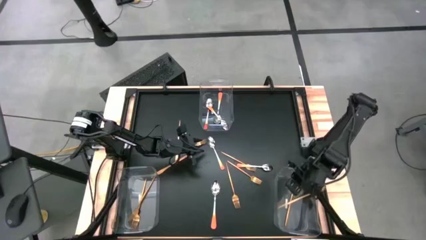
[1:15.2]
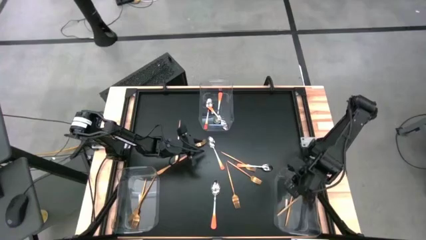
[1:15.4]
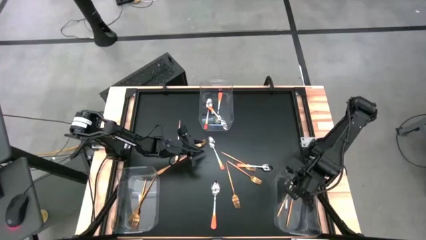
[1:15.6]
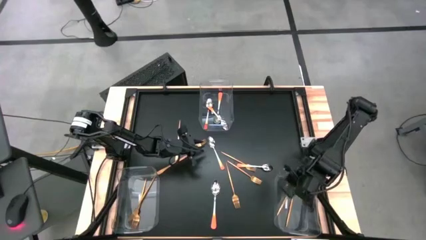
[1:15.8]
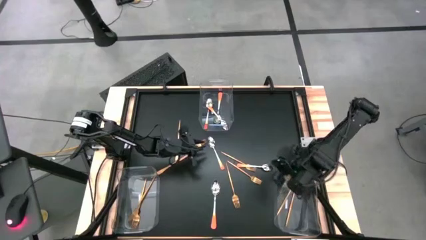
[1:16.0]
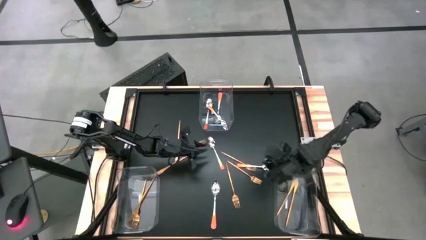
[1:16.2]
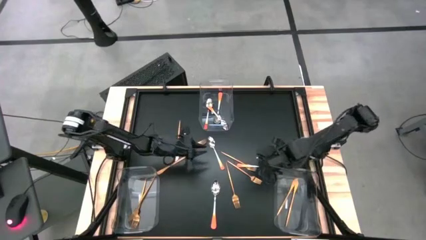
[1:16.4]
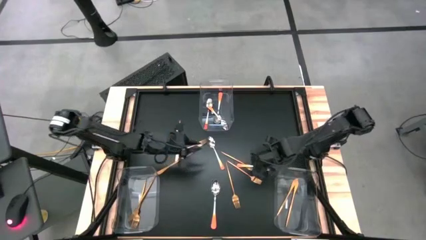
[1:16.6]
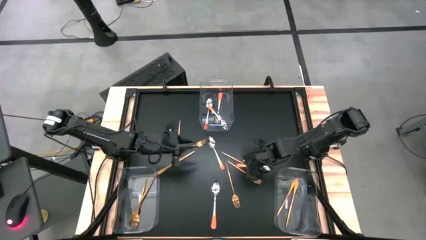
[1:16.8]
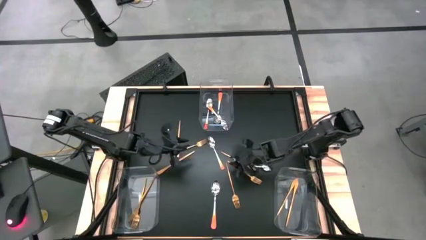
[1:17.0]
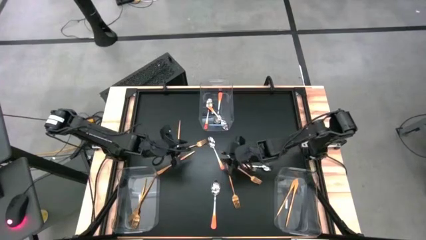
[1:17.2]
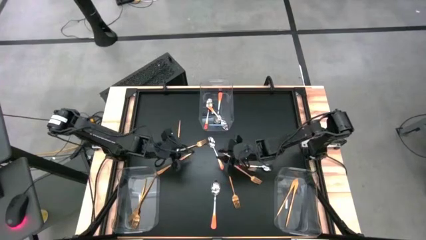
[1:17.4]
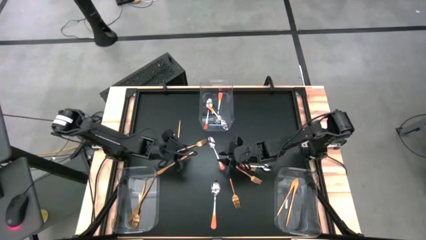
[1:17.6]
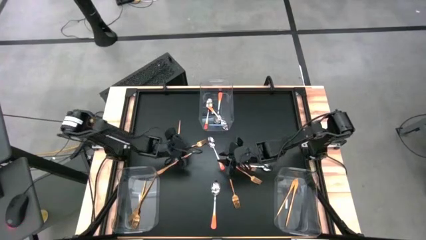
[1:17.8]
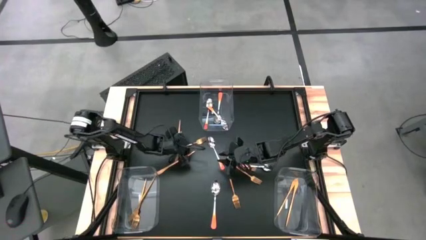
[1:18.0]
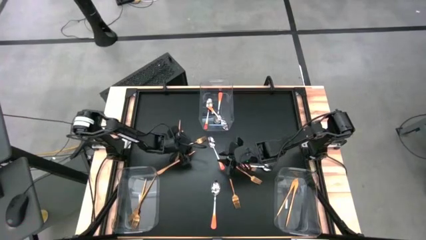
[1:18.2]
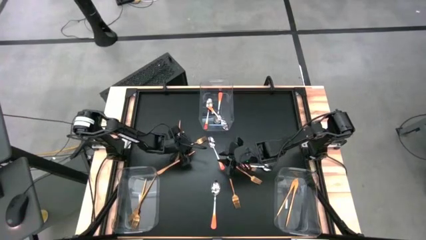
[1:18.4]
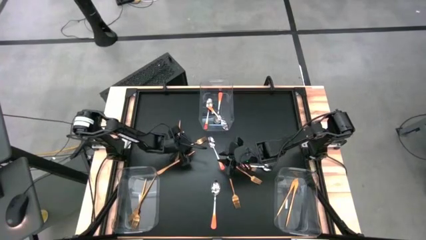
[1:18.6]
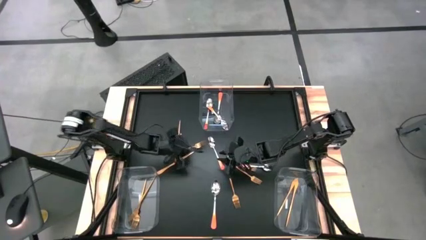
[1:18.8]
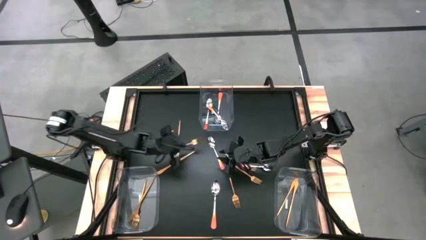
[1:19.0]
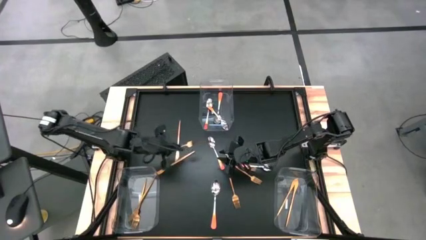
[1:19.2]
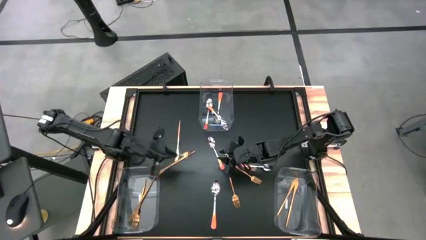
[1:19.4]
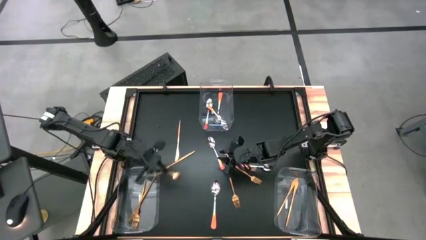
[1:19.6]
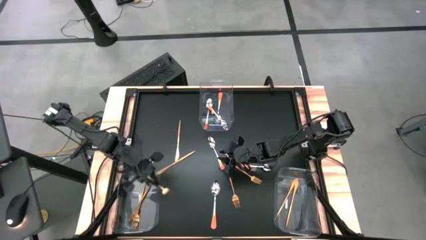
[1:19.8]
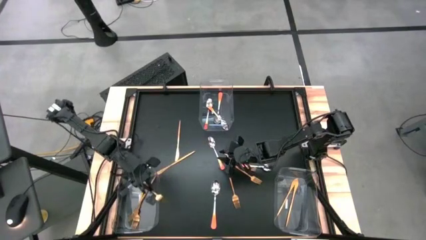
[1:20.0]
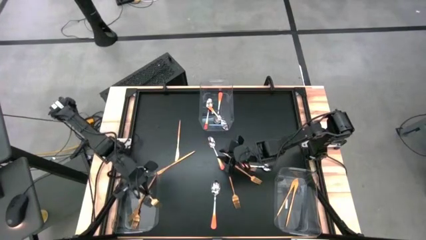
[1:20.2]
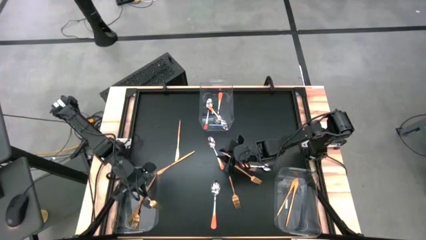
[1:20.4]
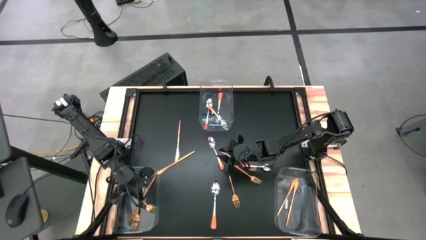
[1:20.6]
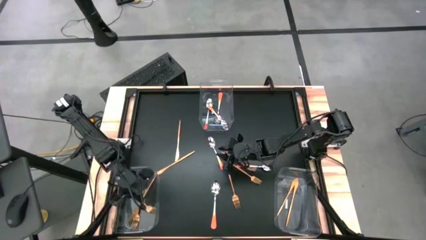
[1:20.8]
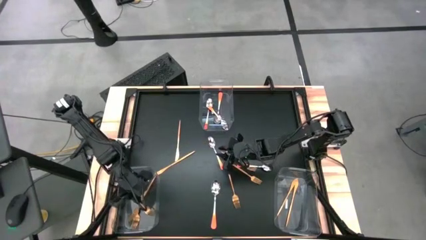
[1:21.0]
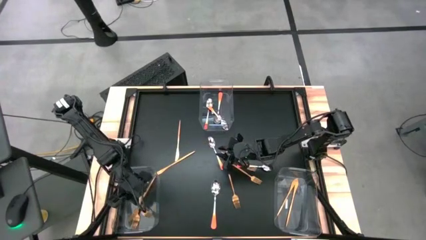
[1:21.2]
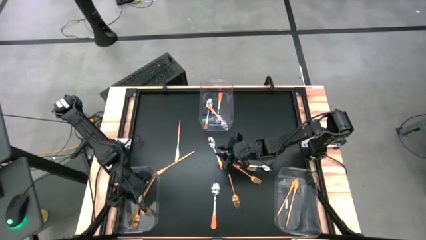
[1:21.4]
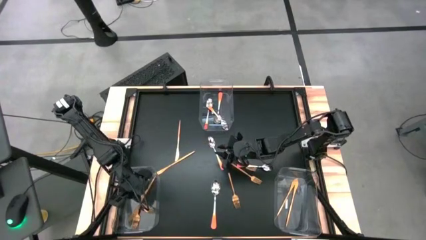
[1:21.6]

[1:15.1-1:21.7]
Task: Sort silverware by color (type)
Put the gold fork into the bottom left transparent bin

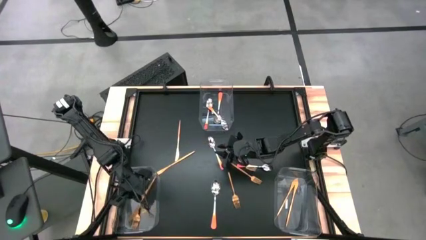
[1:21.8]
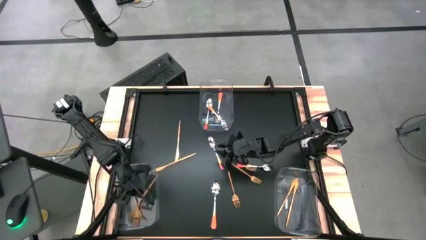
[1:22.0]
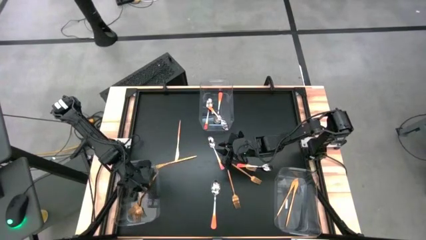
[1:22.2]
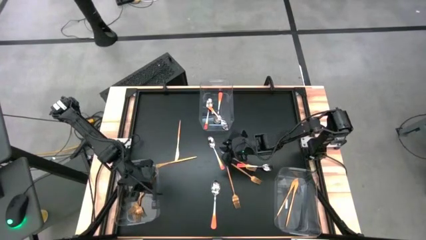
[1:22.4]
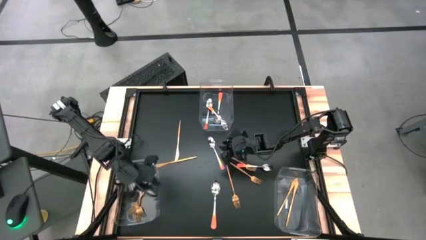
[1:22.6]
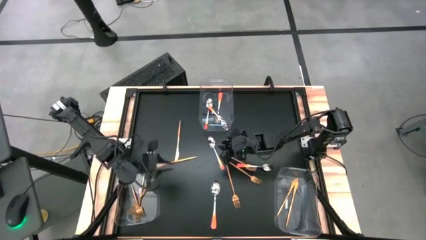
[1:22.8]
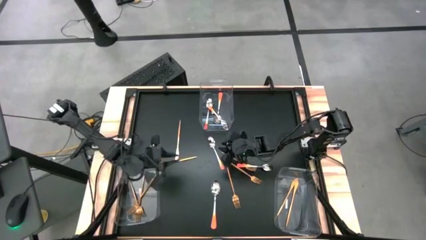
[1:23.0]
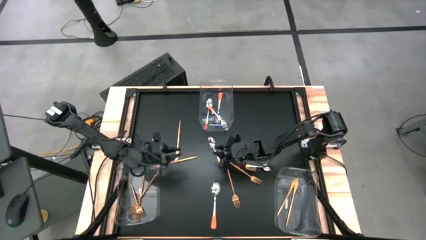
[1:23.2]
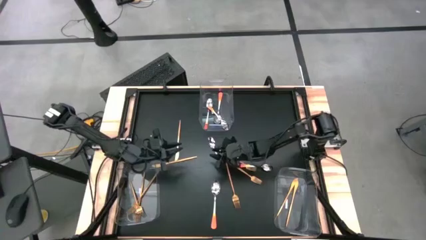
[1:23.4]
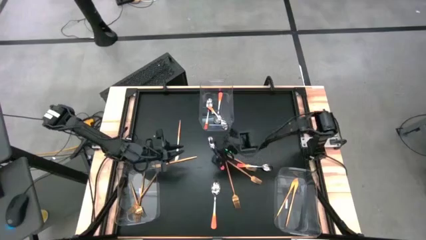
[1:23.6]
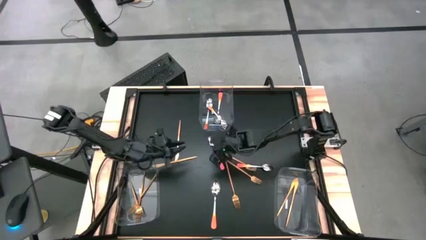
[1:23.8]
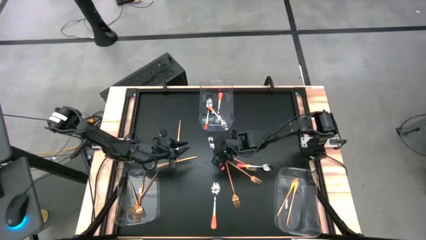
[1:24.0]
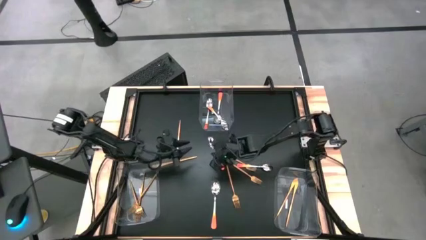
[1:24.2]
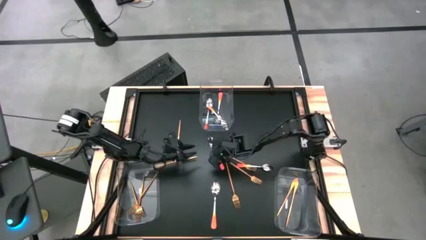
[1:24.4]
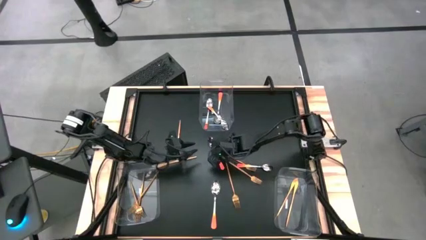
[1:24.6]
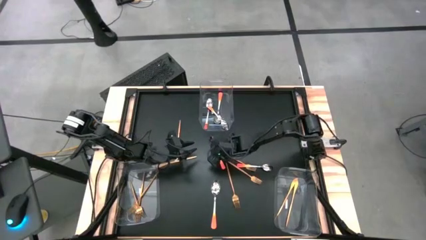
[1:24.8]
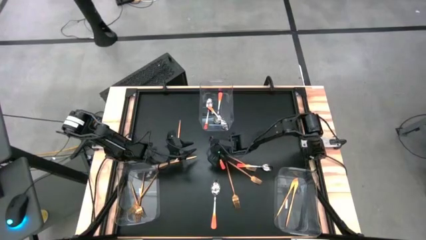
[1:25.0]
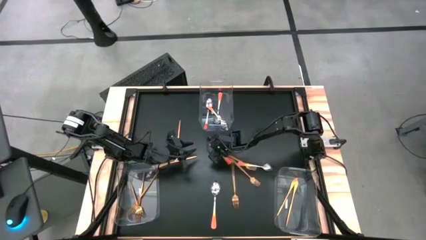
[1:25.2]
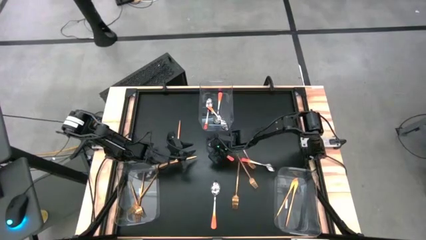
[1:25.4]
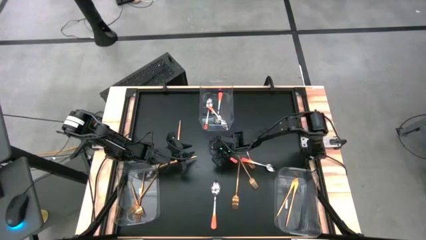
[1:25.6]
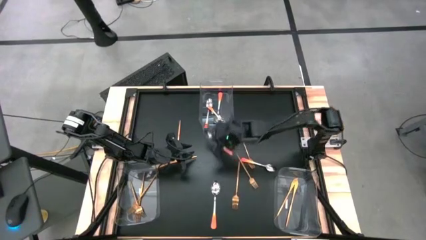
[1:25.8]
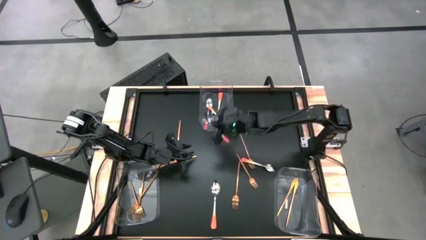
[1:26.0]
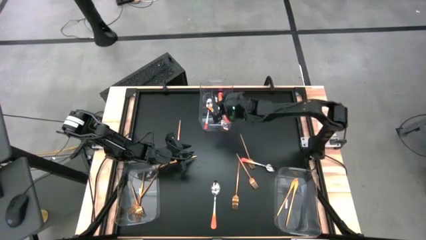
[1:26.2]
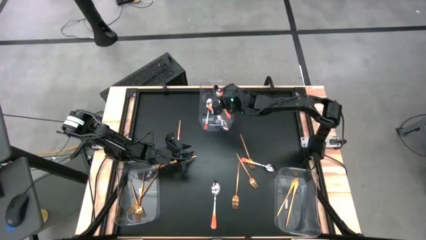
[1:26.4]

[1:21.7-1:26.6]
Put the orange spoon into the top transparent bin

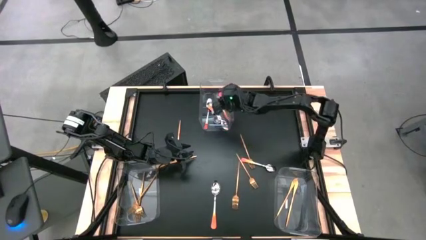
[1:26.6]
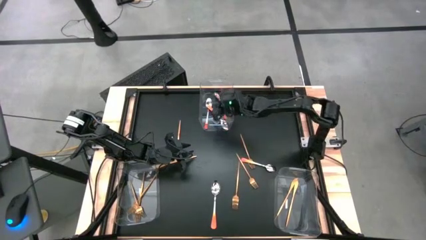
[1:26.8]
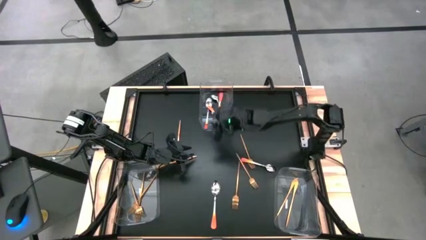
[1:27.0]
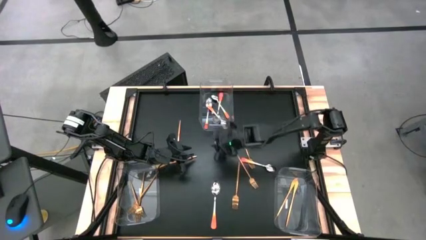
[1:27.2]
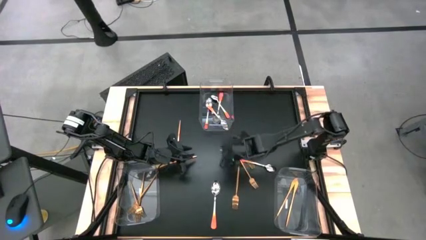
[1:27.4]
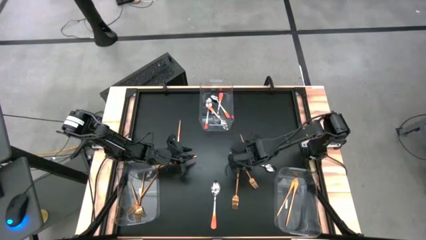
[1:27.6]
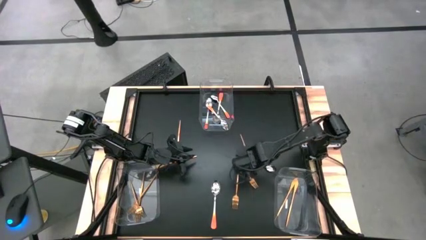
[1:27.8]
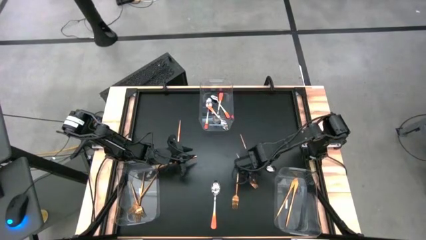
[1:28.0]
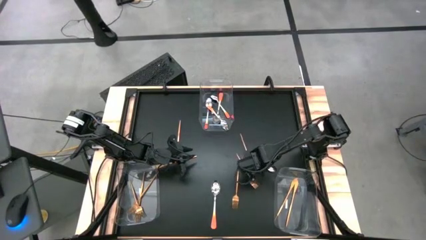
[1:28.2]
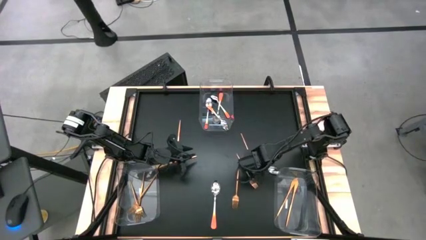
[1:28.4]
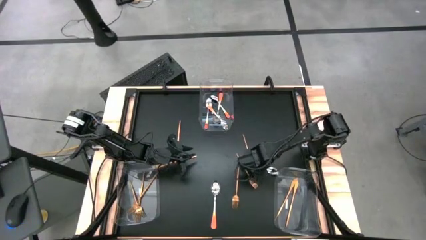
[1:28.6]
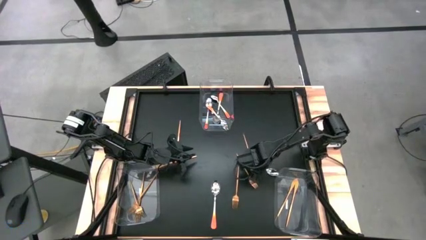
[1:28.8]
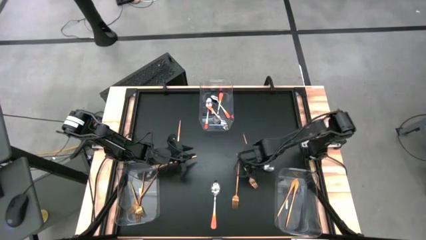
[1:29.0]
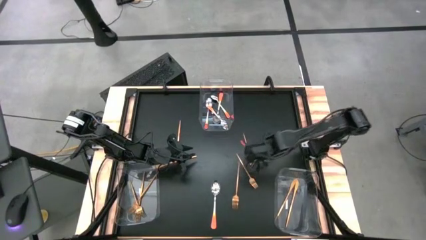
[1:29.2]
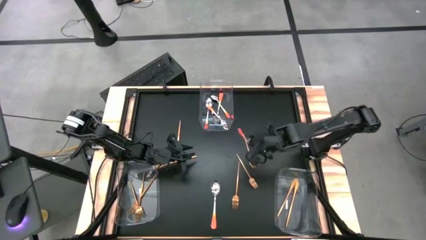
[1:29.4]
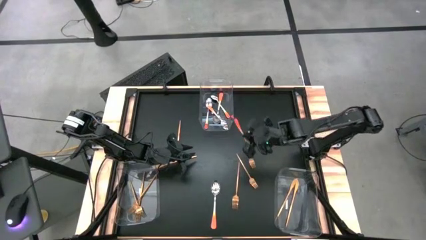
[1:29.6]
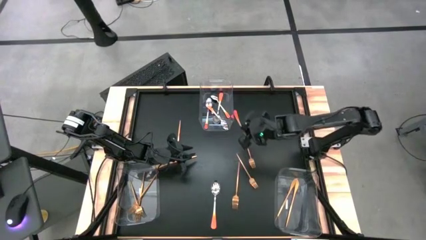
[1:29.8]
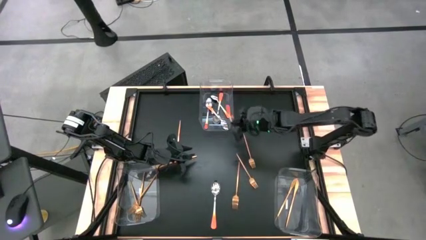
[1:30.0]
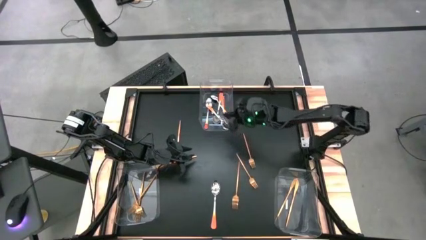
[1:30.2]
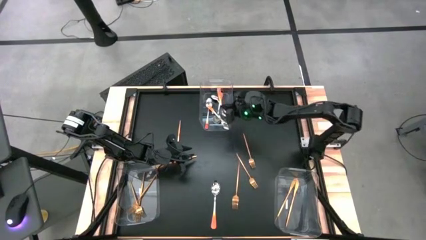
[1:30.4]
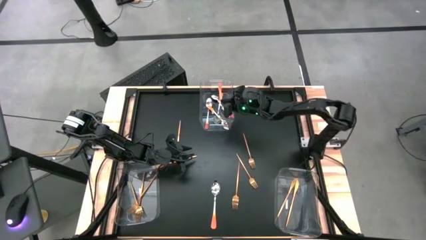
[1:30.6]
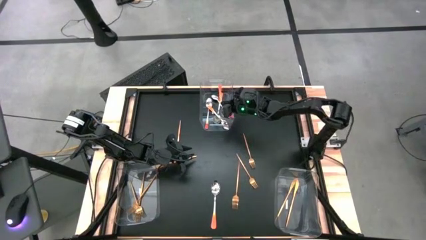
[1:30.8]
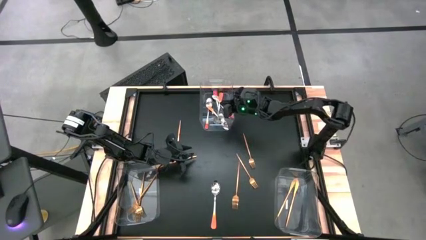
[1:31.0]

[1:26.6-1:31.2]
Put the orange spoon into the top transparent bin
